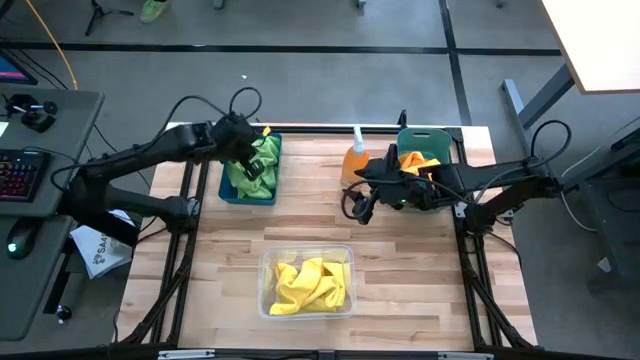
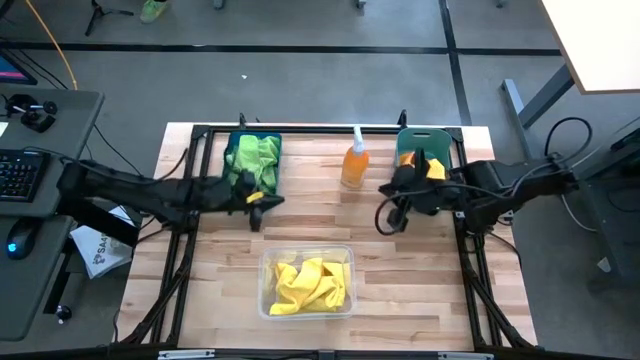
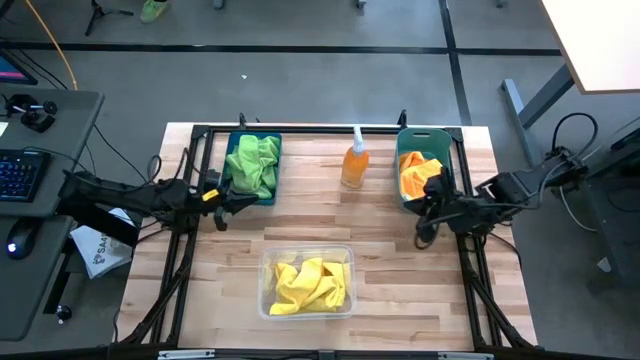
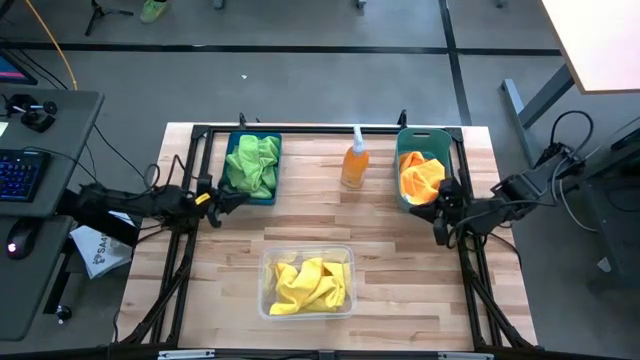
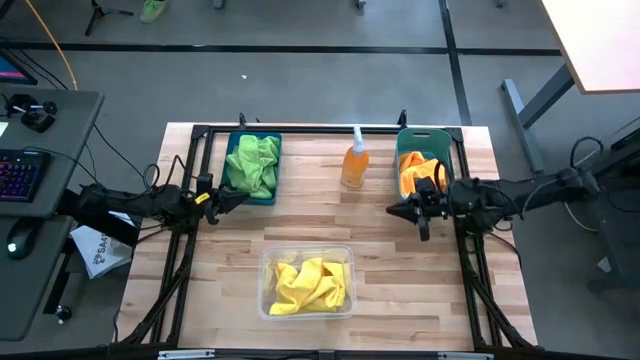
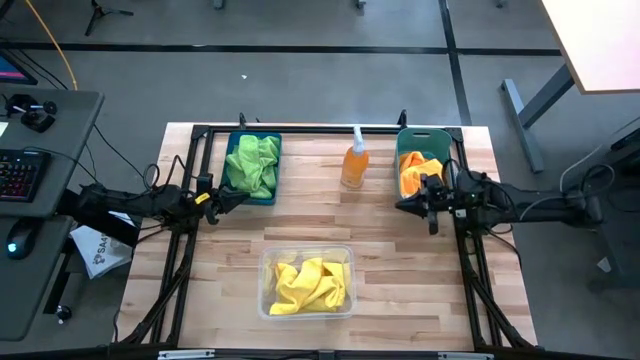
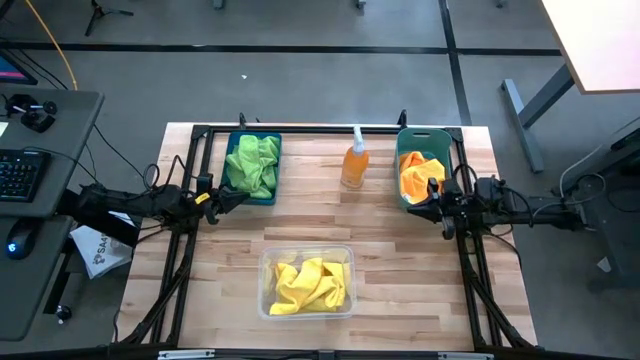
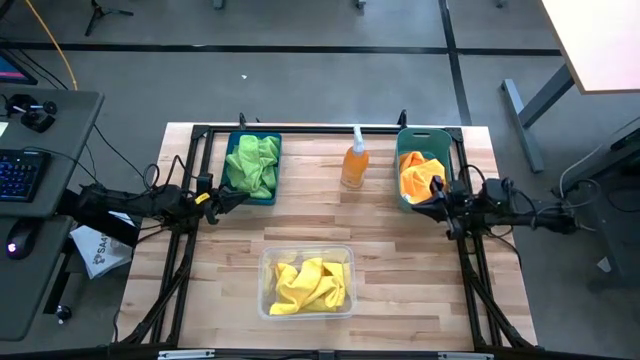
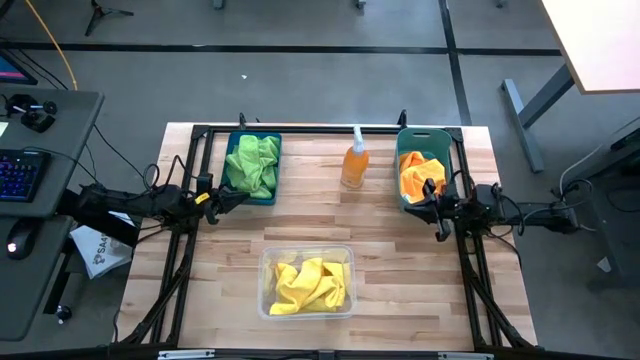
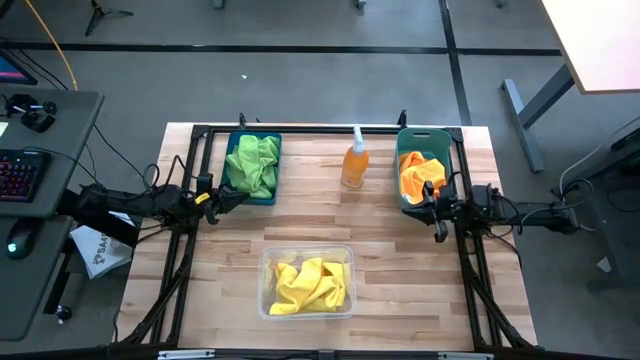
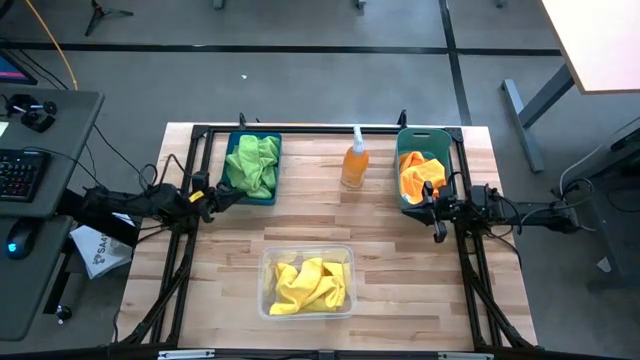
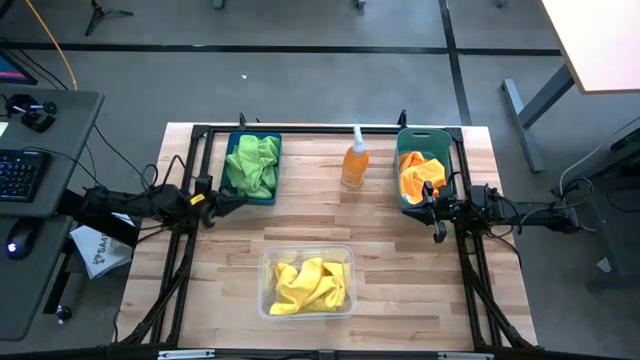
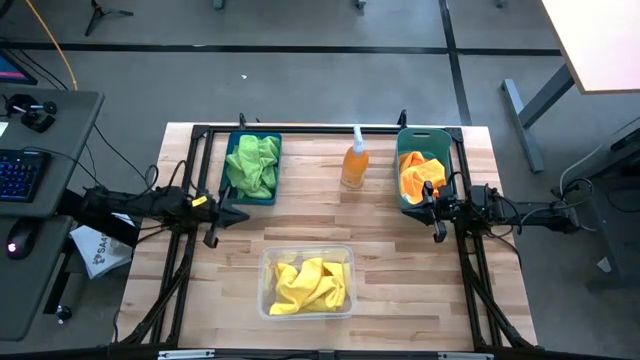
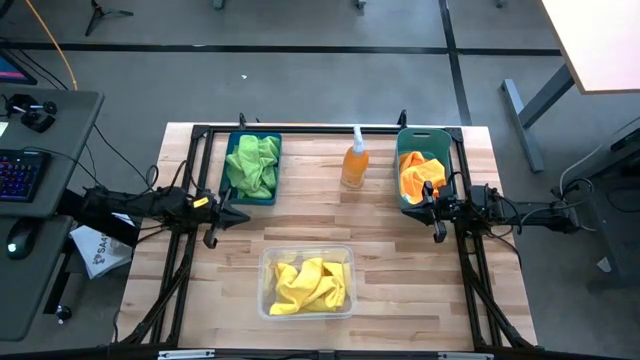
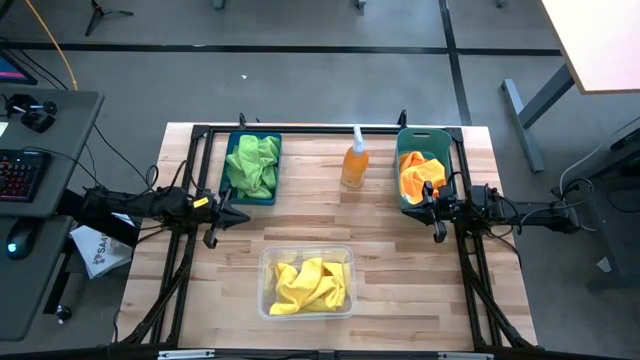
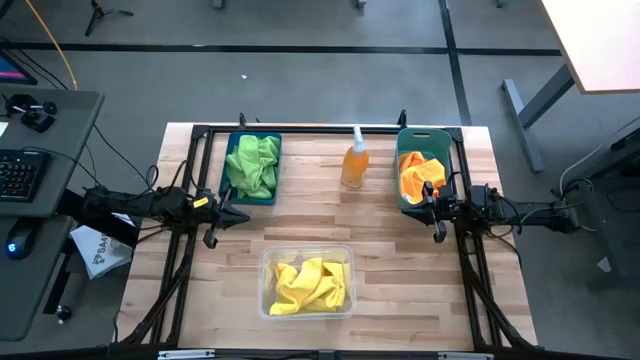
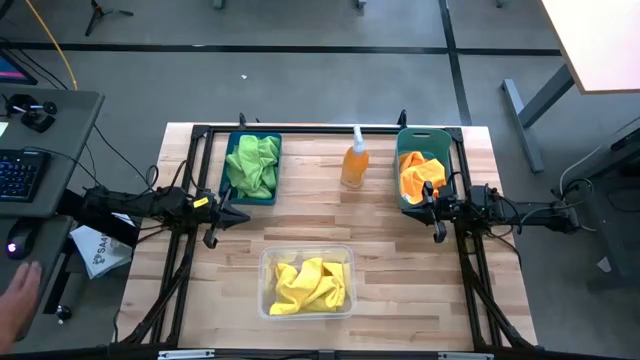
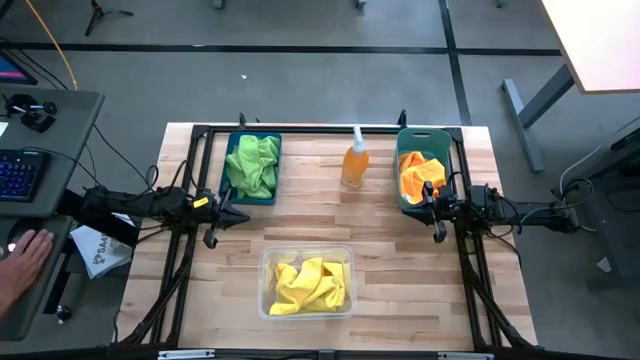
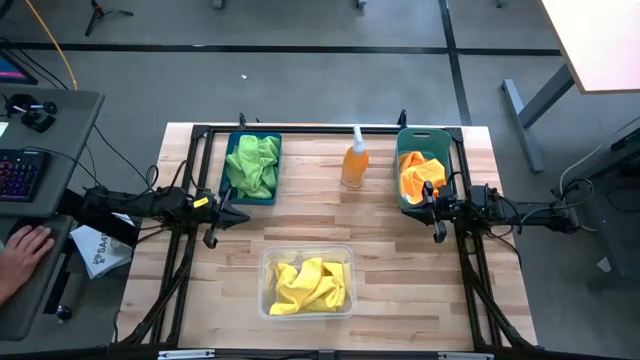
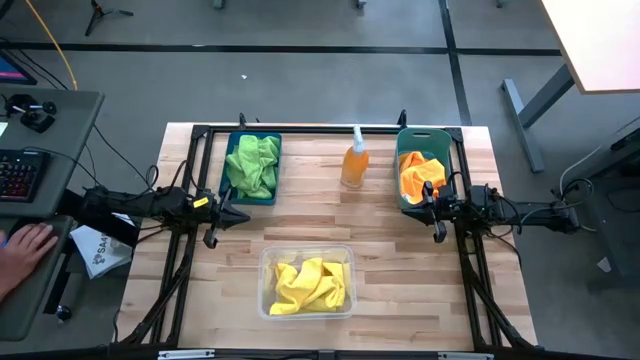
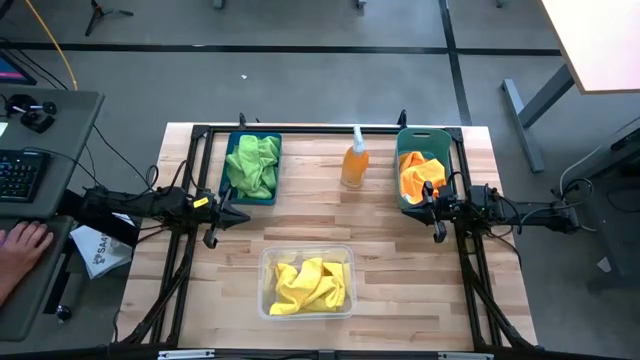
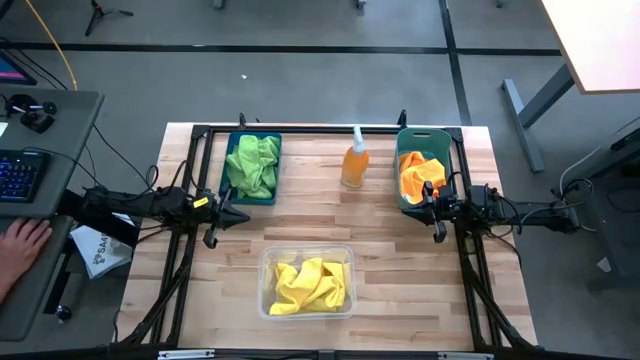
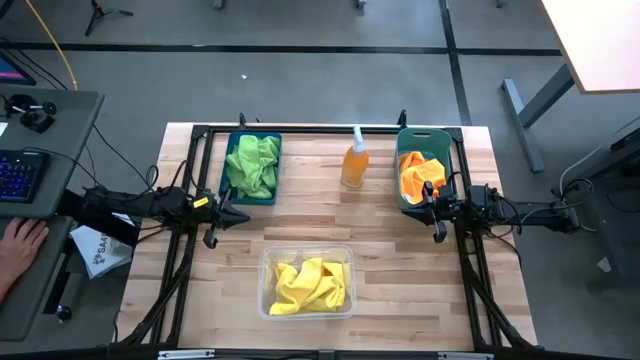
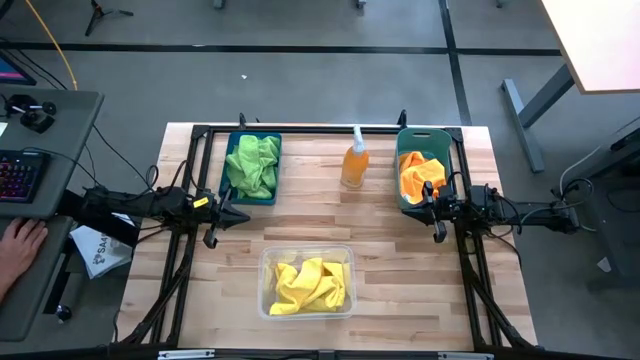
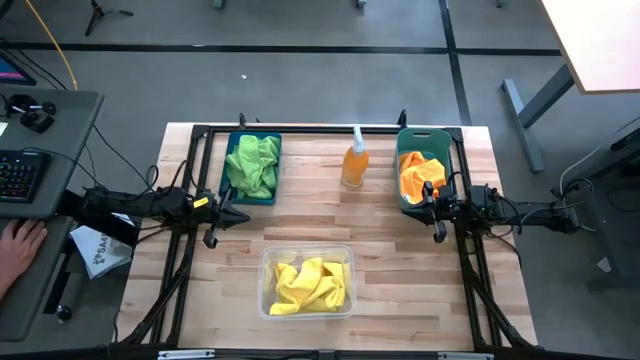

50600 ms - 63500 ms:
Task: Sort microfiber towel by color & place in baskets
Return to Home Position

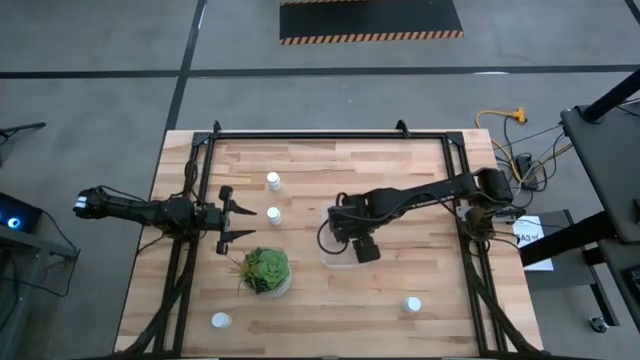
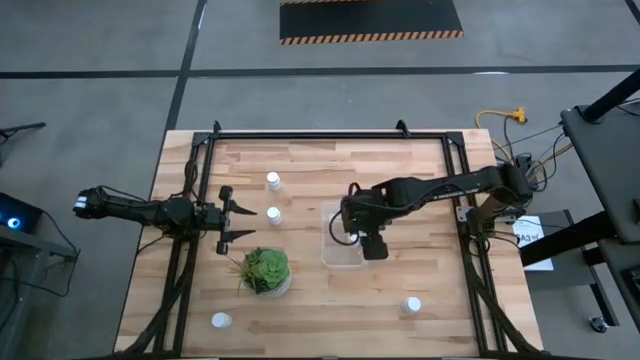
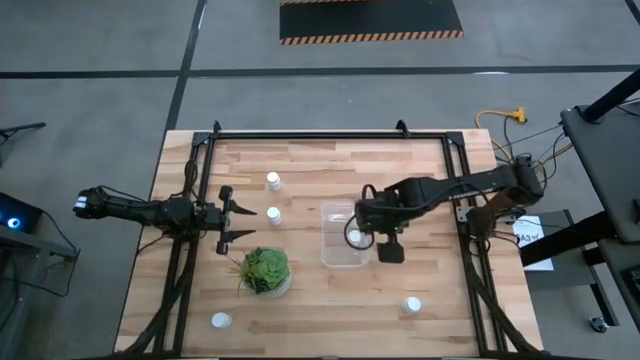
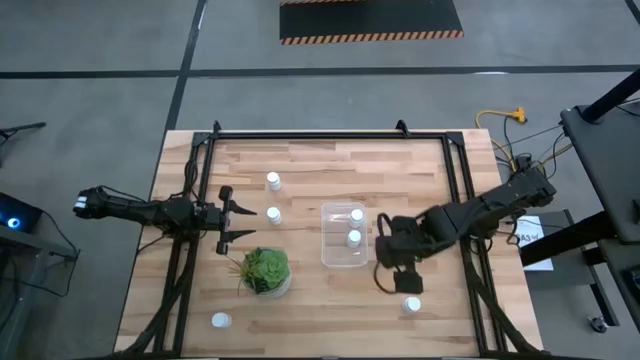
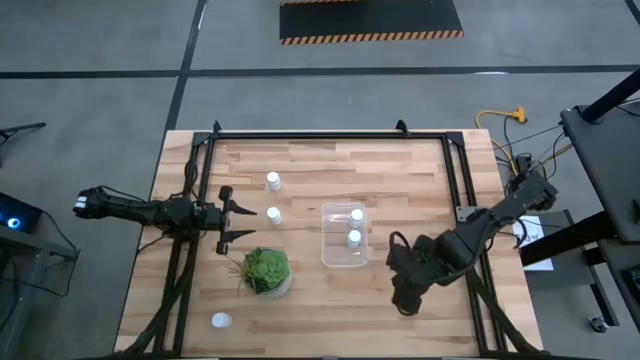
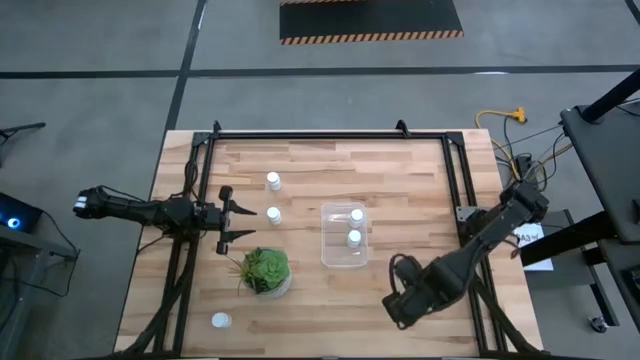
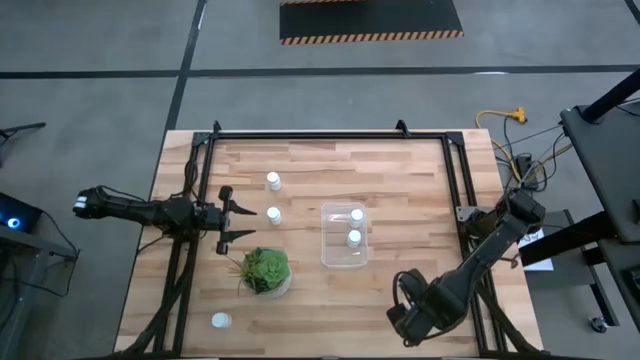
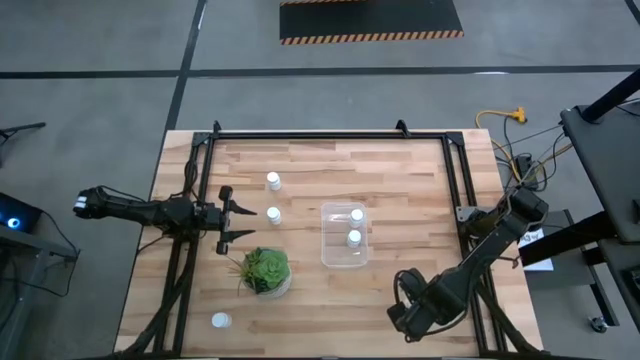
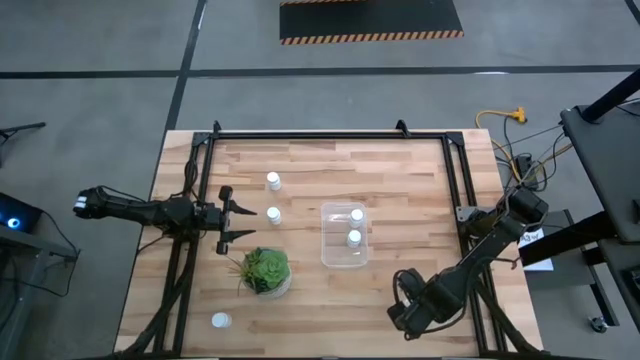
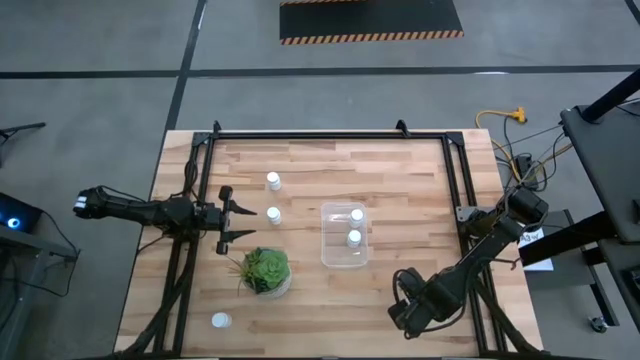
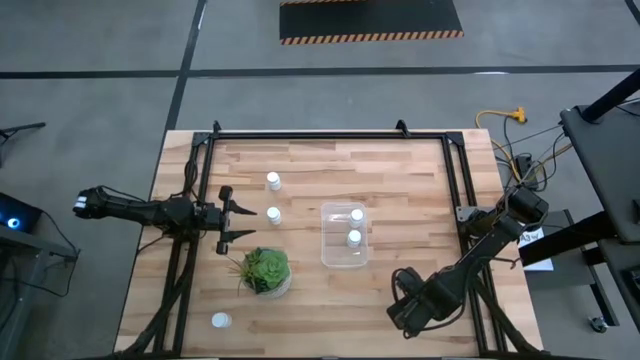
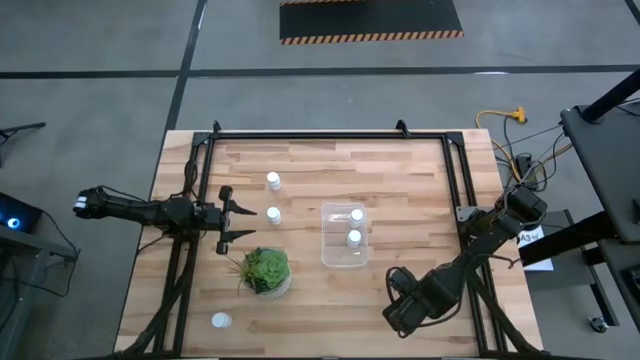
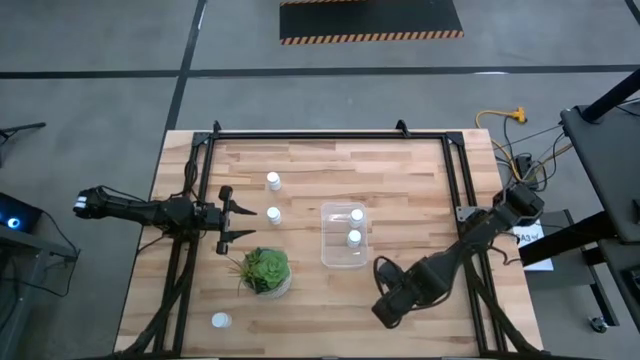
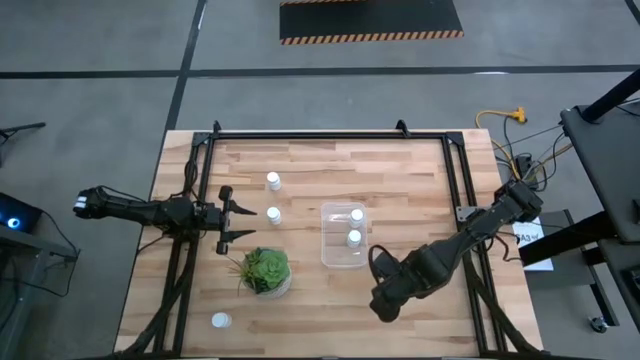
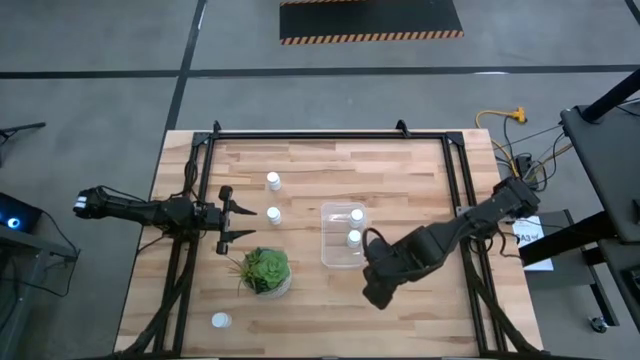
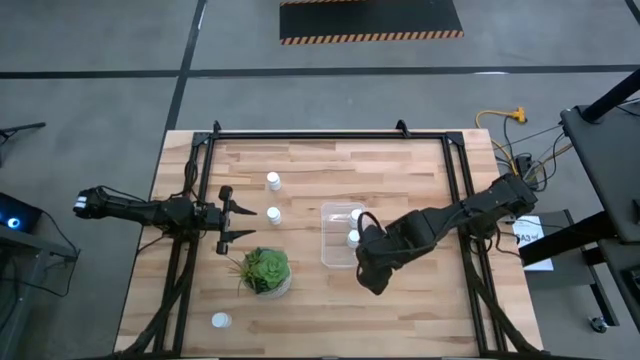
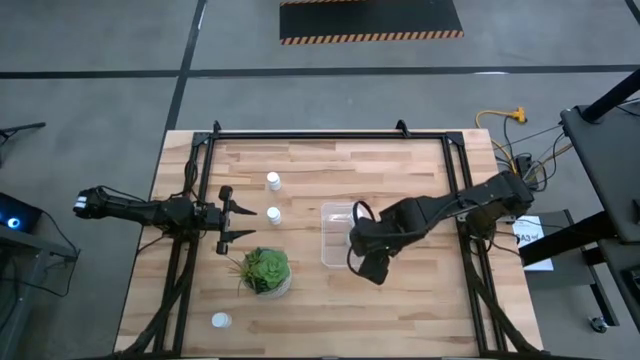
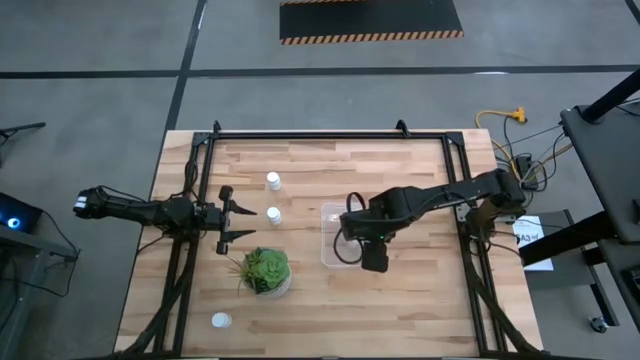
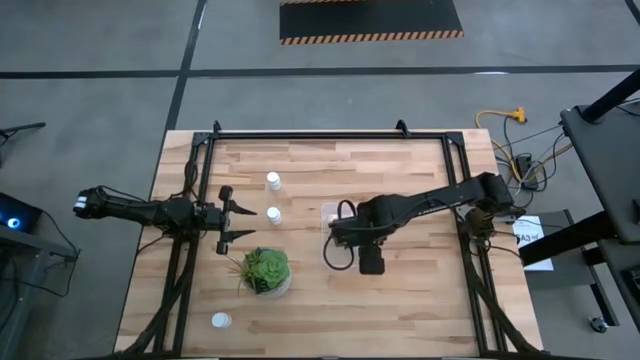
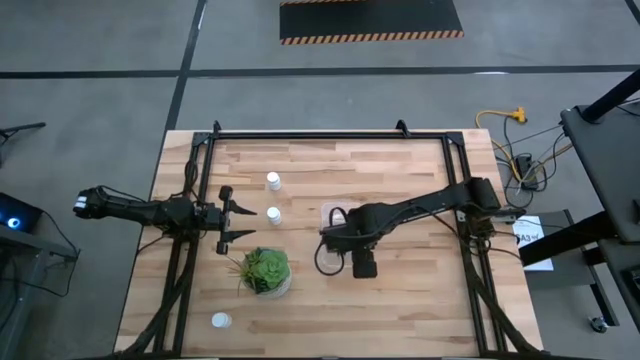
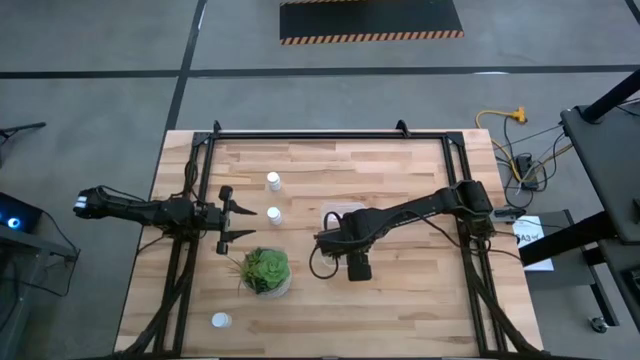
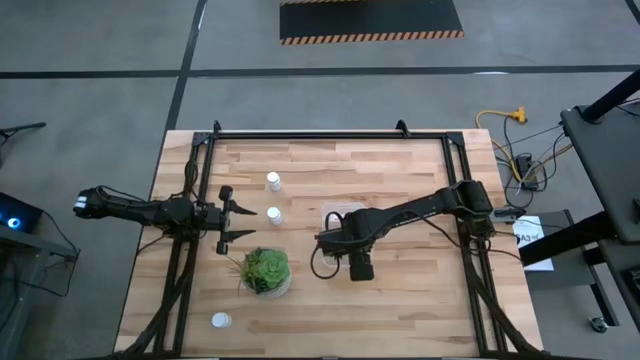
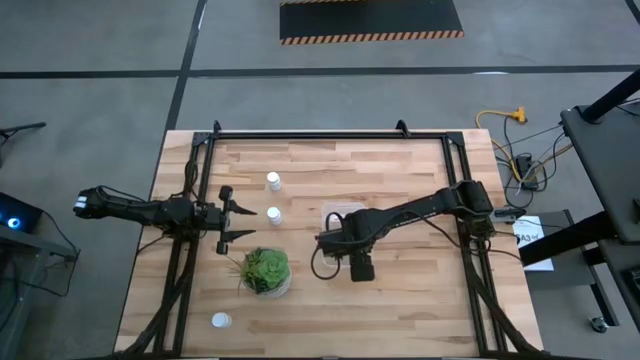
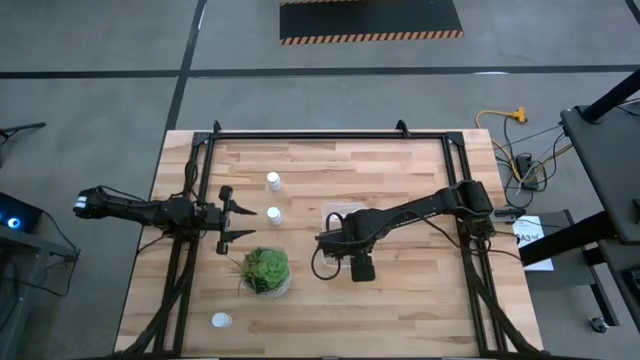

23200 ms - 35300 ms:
Task: Pick and place pill bottles into a basket
Put the white medicine bottle into the transparent bin
